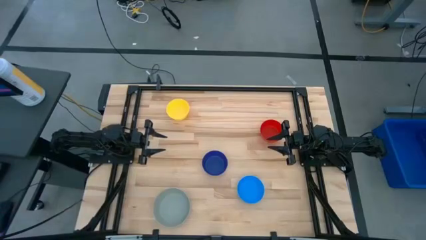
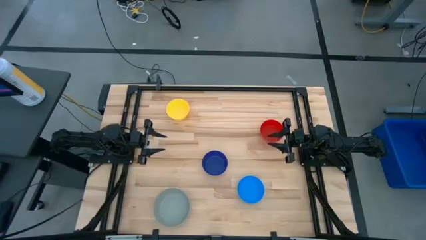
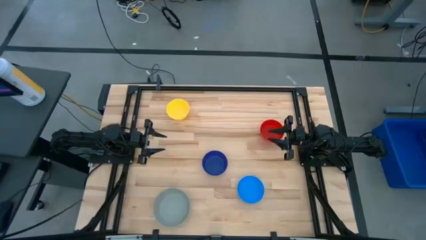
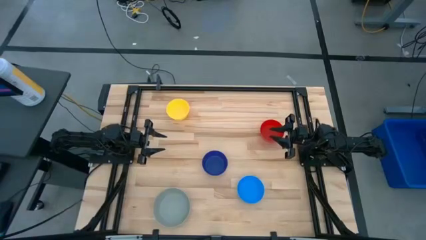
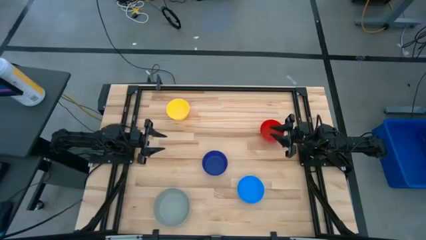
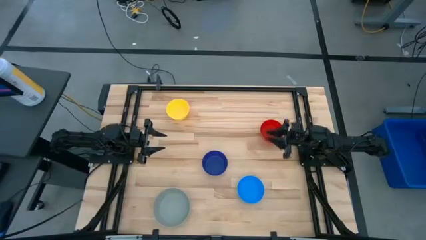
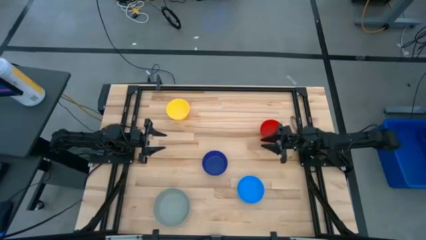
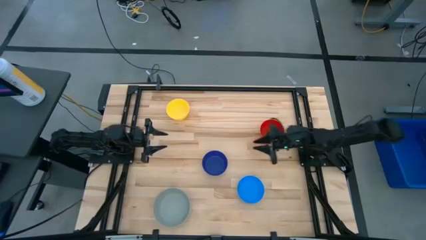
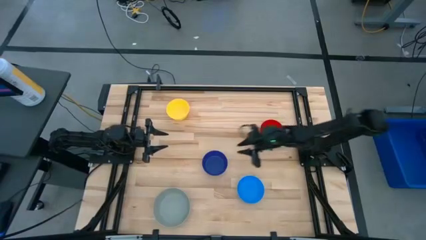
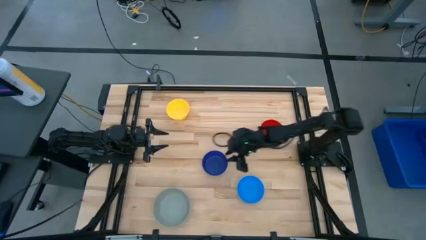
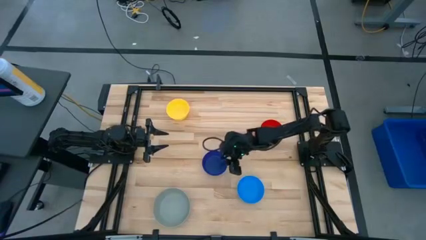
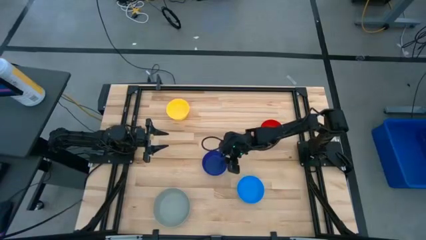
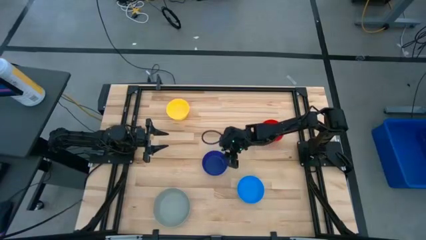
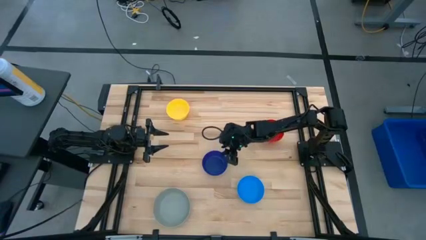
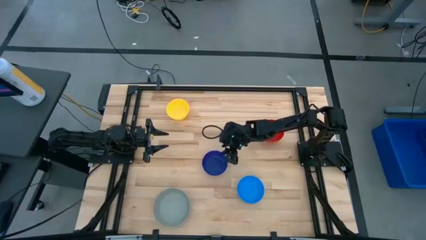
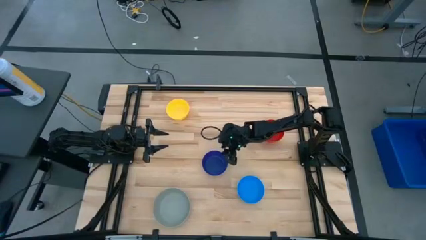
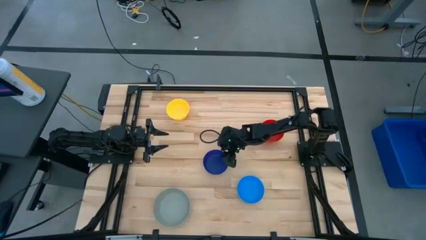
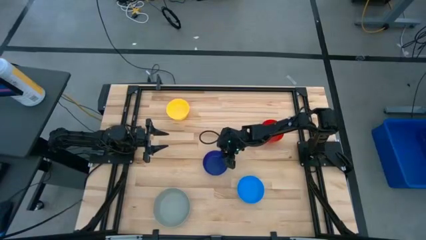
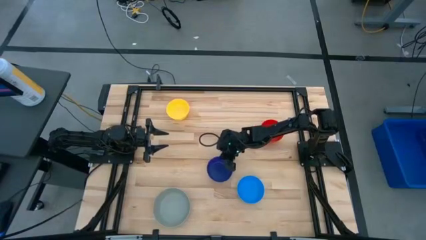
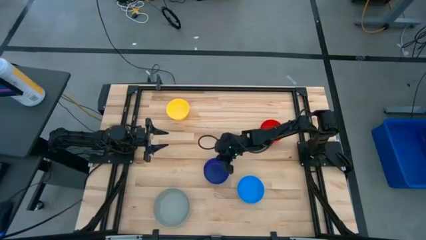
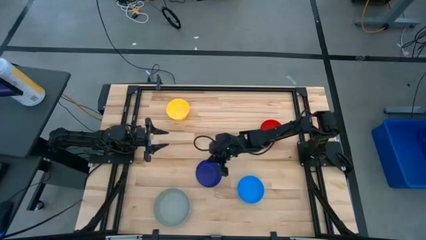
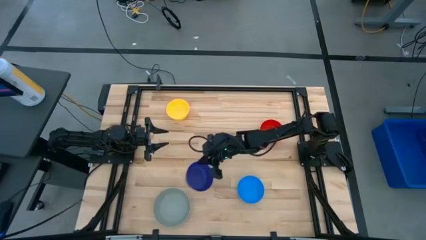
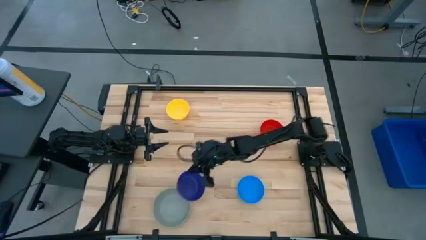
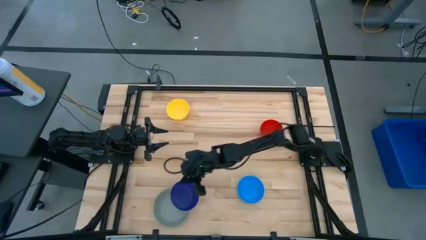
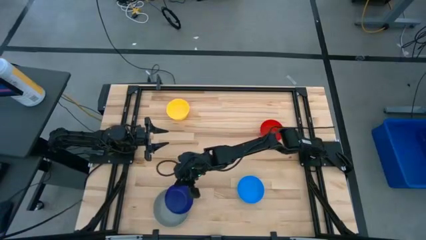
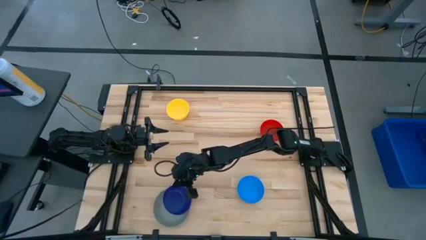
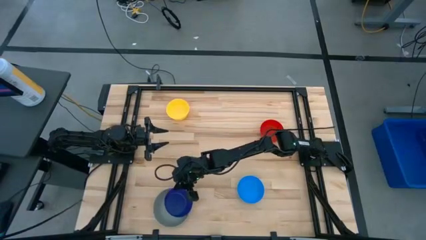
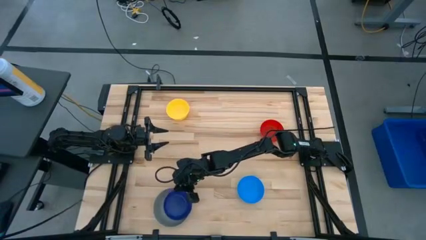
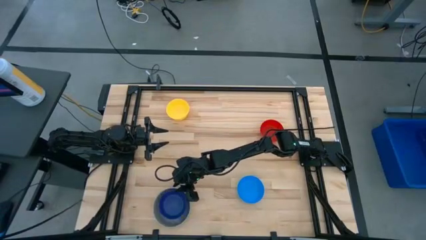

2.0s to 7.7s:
Stack the dark blue bowl on the white bowl

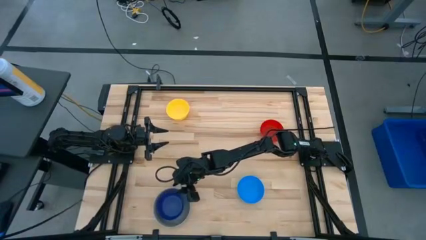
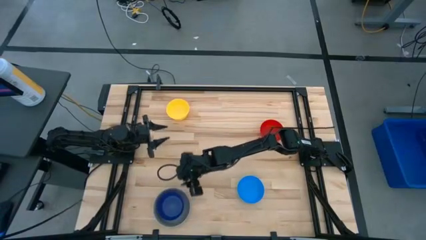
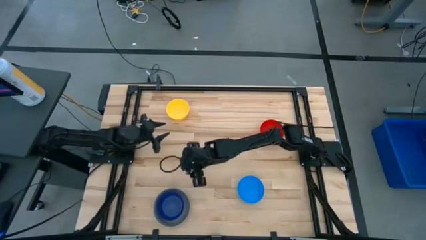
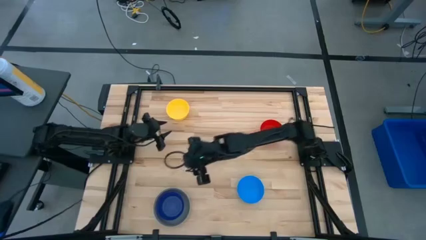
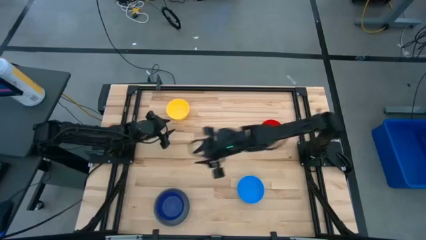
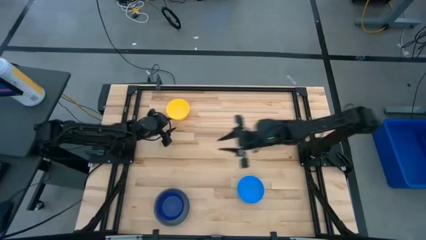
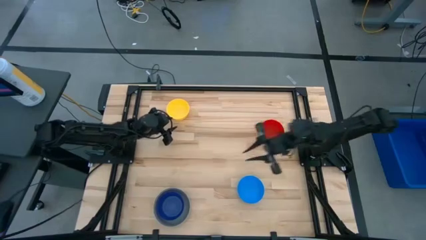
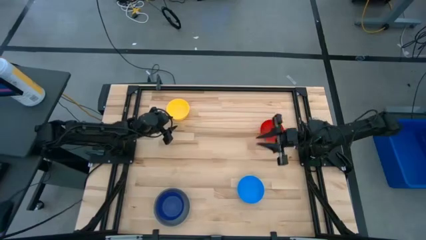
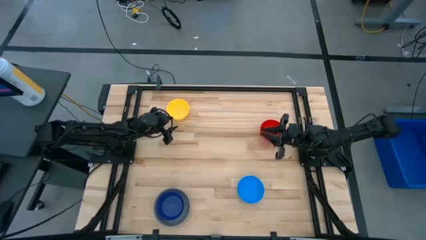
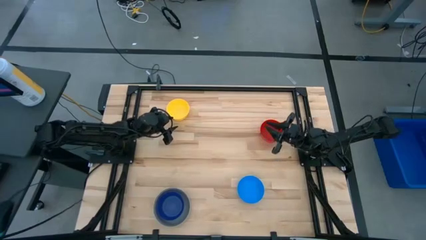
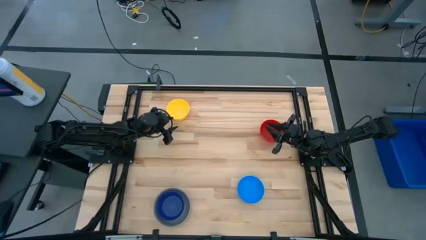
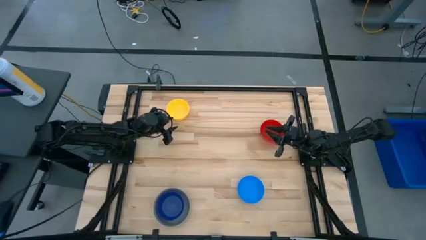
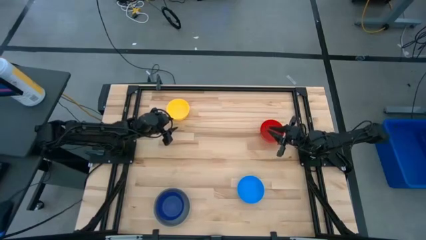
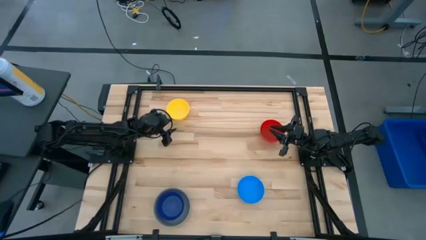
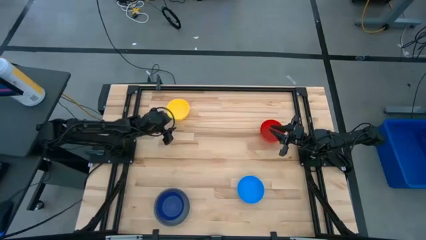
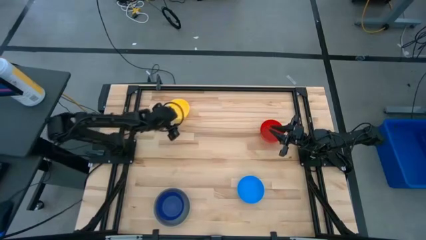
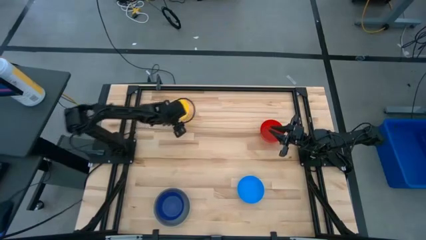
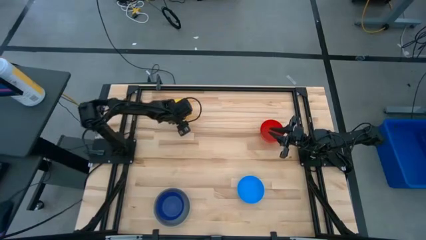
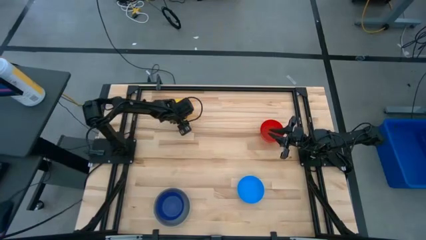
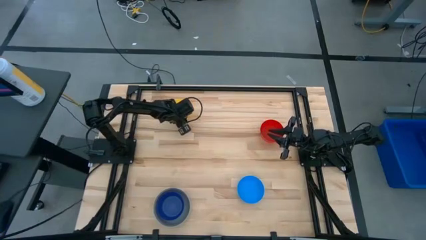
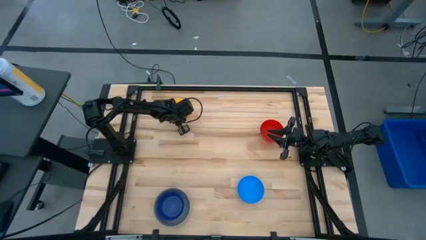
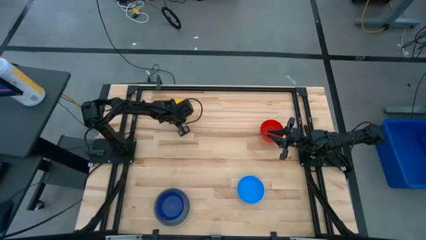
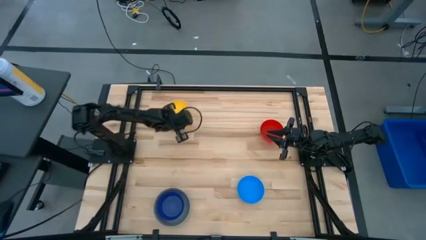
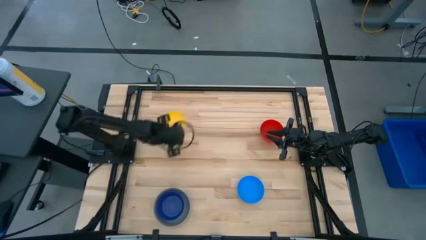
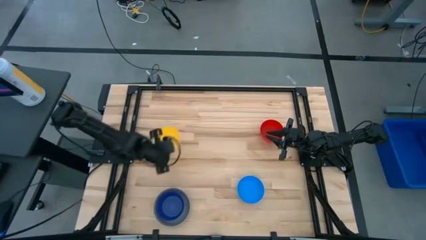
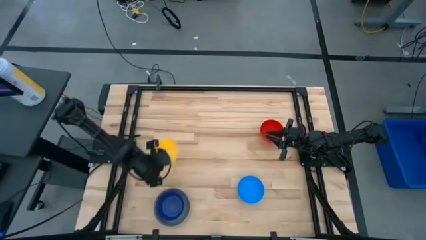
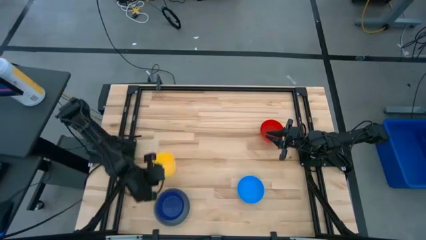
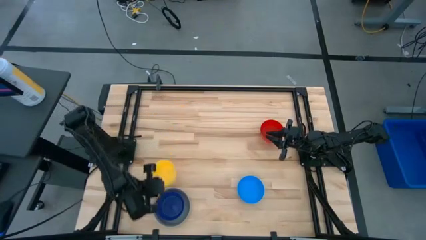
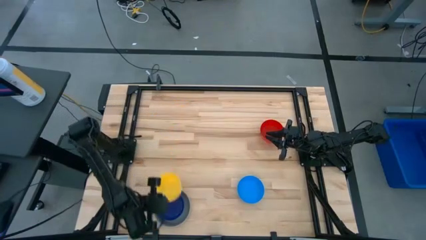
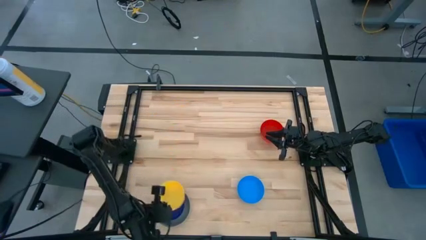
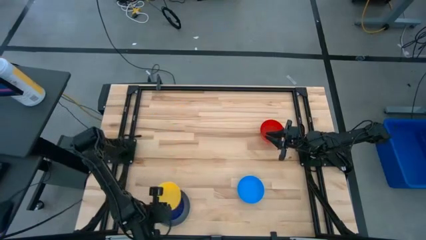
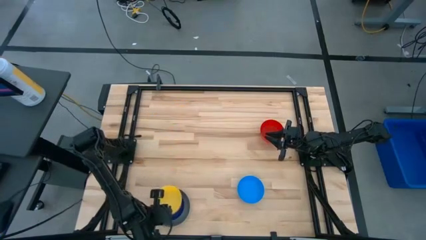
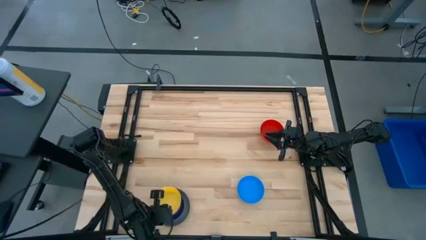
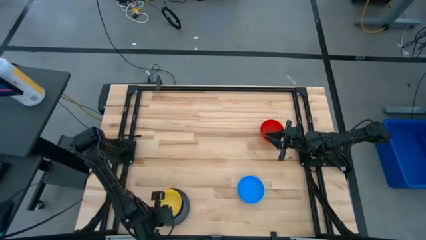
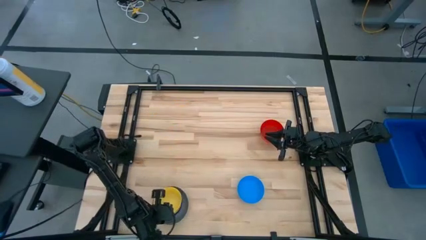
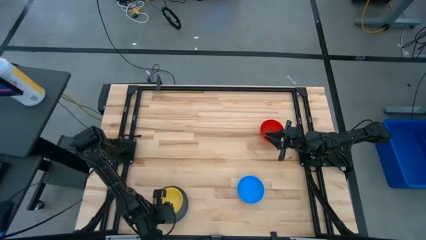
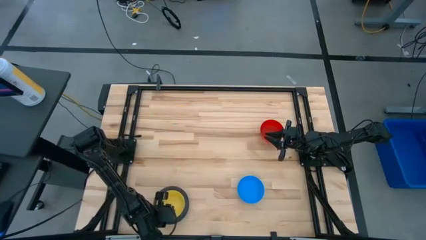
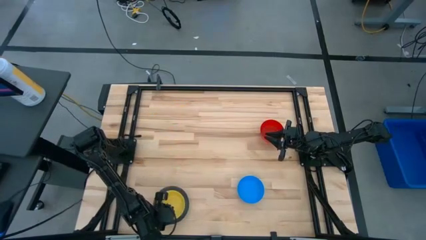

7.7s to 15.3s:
Stack the yellow bowl on the dark blue bowl

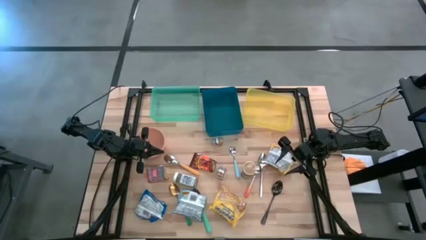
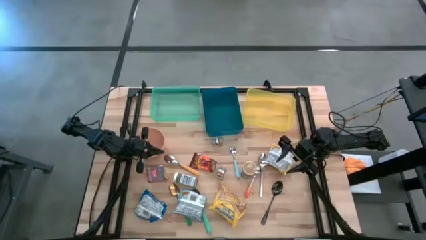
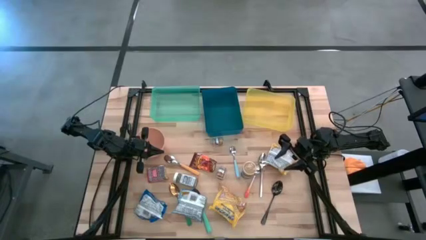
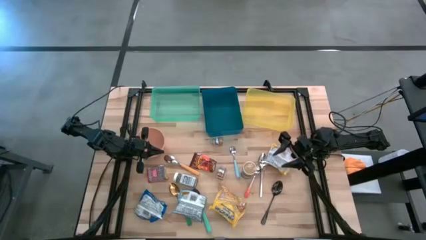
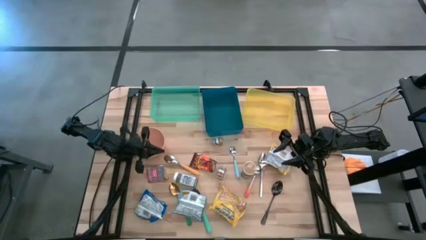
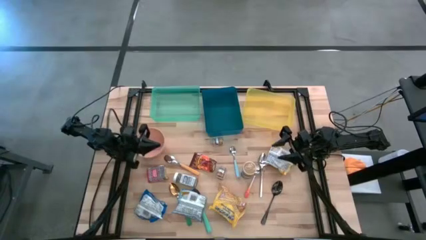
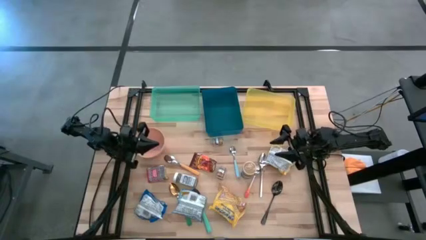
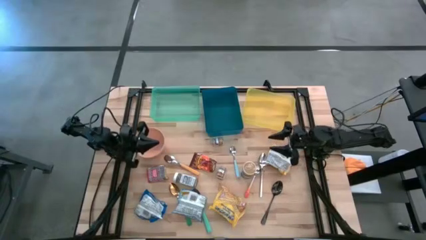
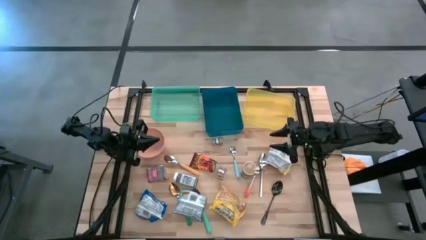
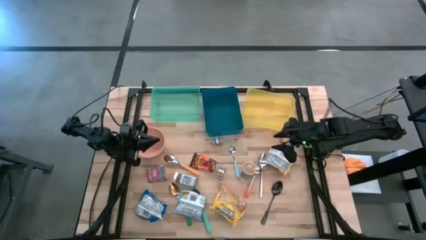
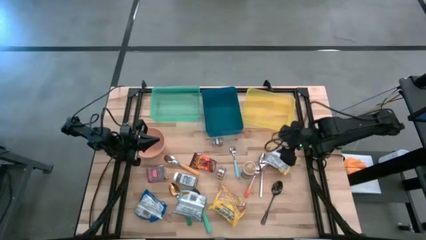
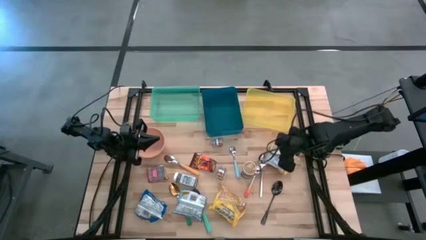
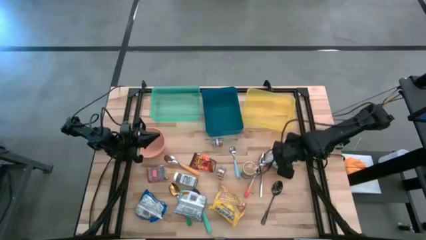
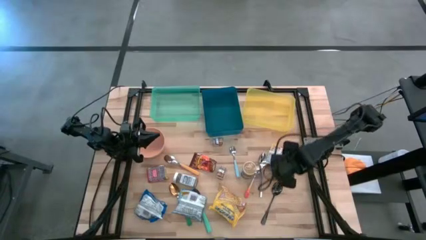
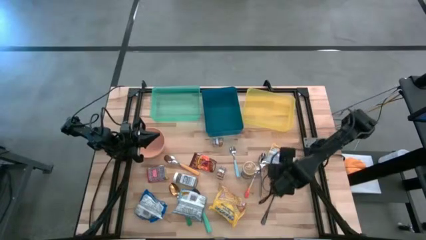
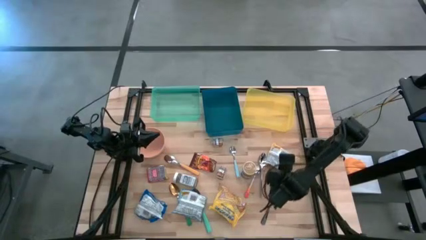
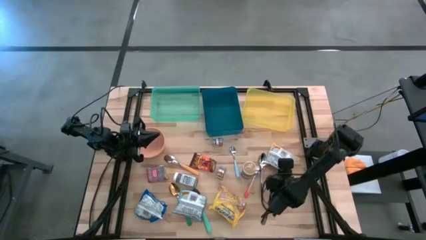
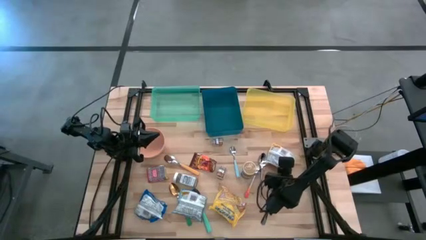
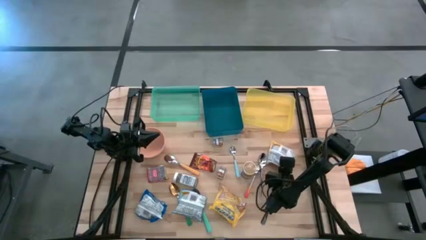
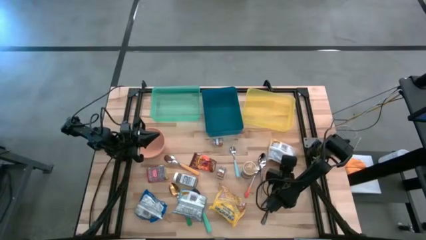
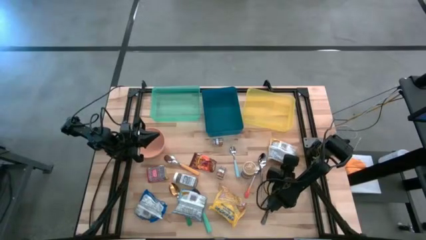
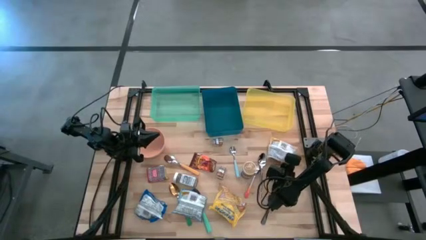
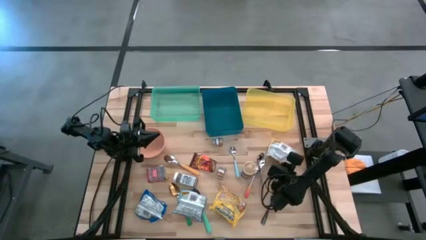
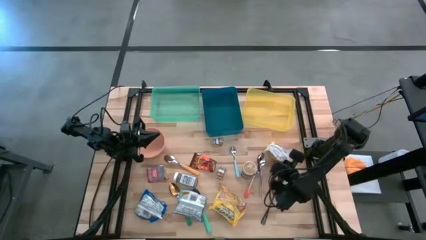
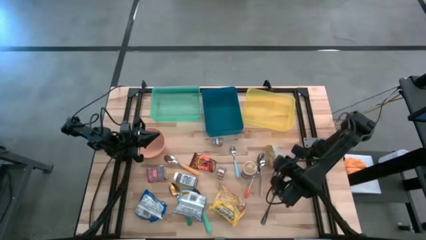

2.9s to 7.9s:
Put the top yellow noodle pack into the yellow bin
